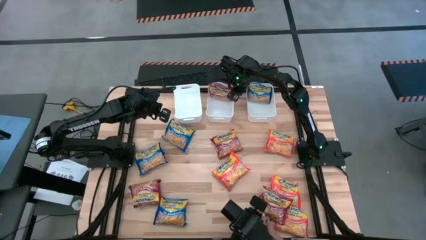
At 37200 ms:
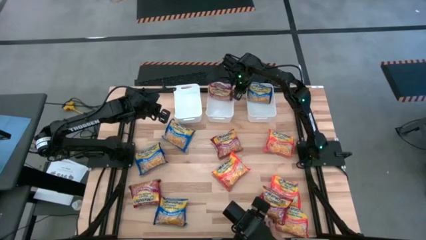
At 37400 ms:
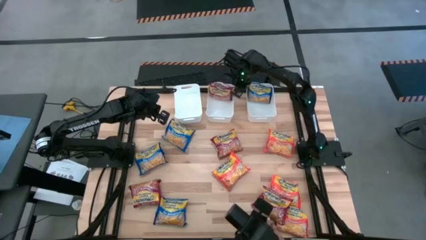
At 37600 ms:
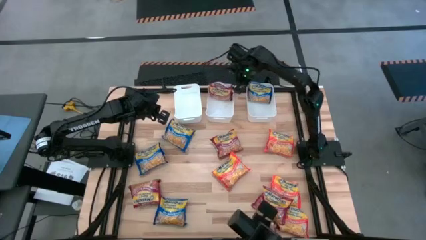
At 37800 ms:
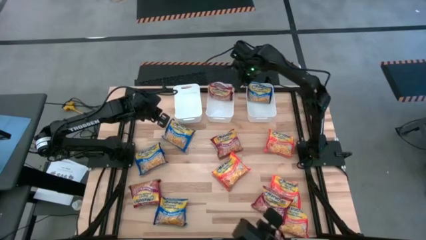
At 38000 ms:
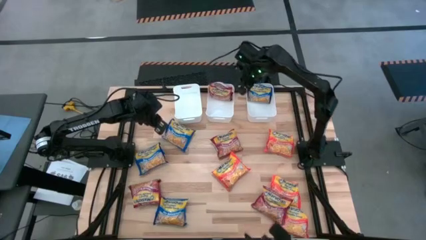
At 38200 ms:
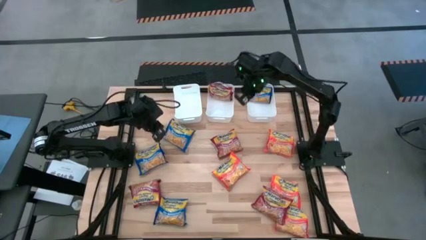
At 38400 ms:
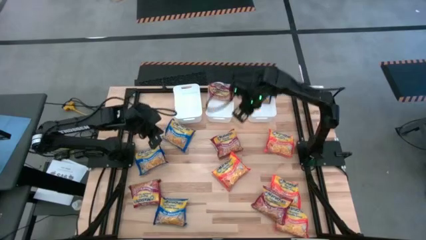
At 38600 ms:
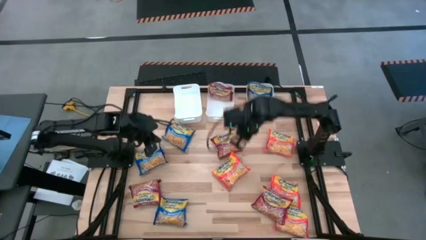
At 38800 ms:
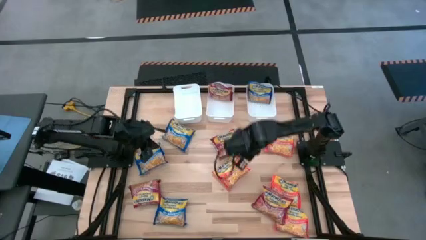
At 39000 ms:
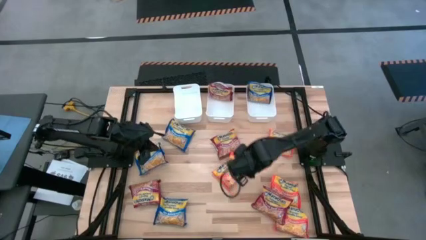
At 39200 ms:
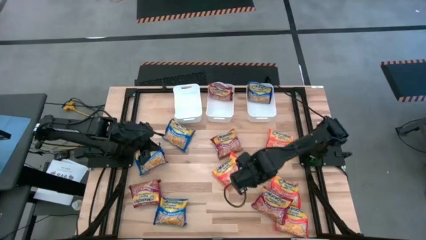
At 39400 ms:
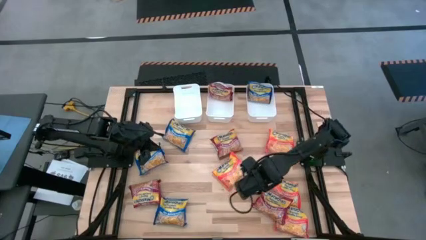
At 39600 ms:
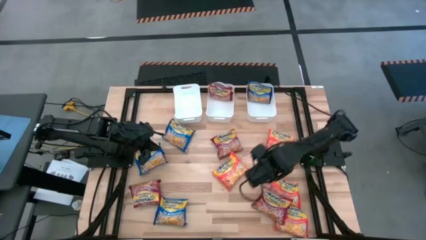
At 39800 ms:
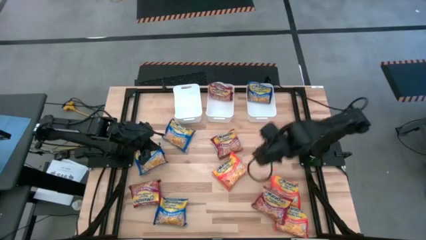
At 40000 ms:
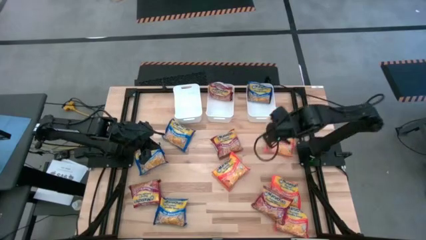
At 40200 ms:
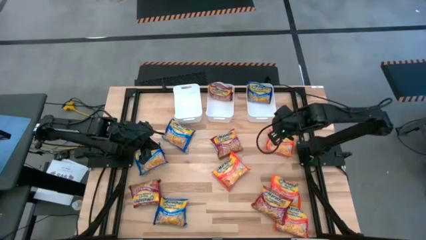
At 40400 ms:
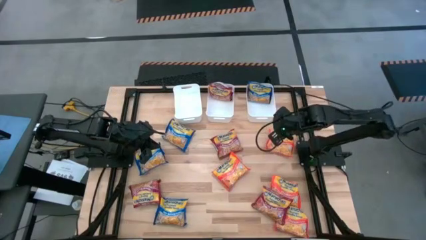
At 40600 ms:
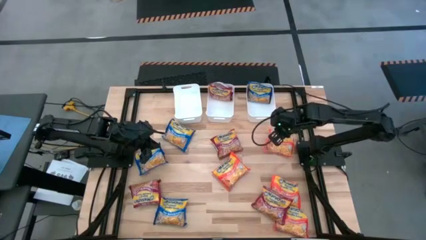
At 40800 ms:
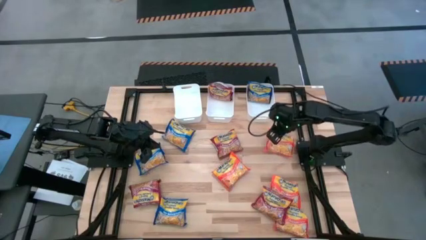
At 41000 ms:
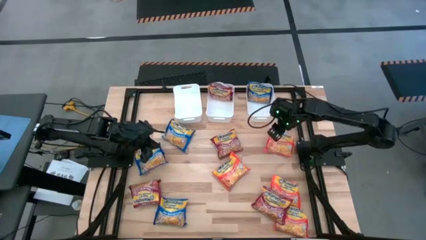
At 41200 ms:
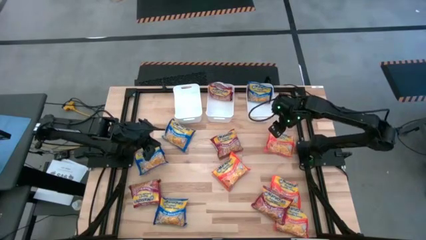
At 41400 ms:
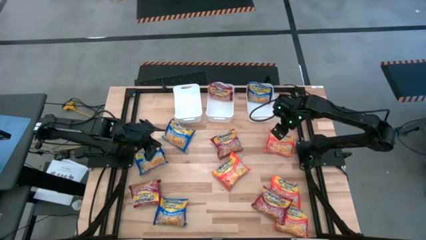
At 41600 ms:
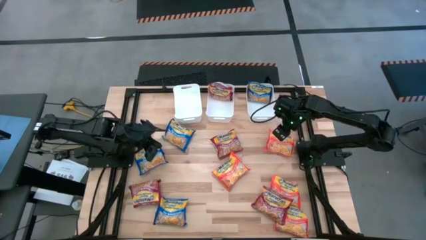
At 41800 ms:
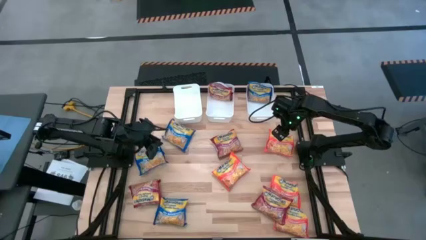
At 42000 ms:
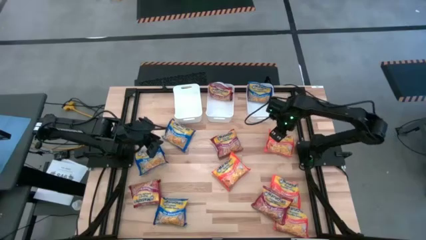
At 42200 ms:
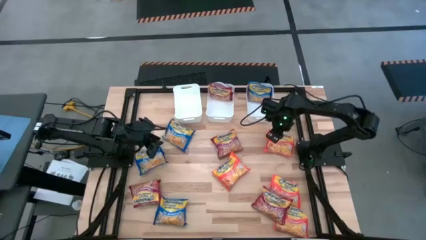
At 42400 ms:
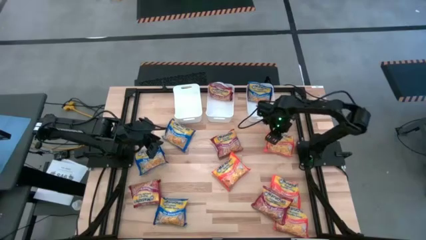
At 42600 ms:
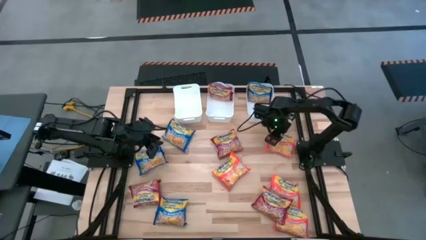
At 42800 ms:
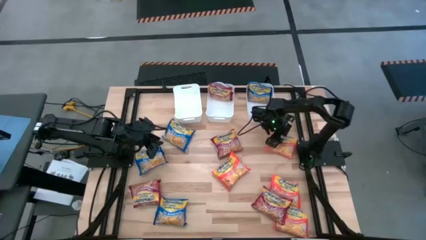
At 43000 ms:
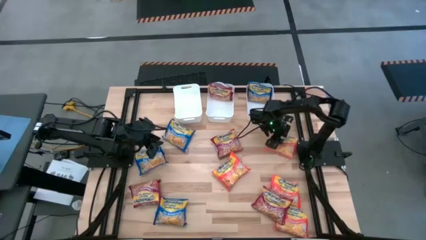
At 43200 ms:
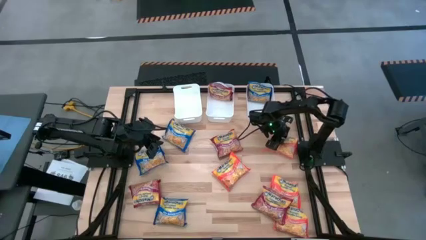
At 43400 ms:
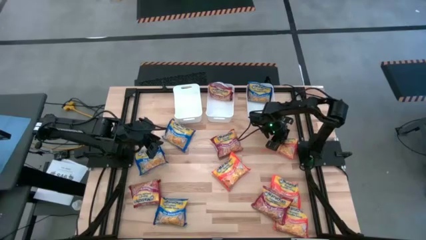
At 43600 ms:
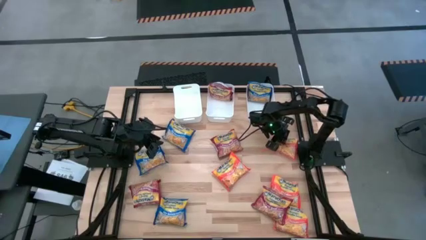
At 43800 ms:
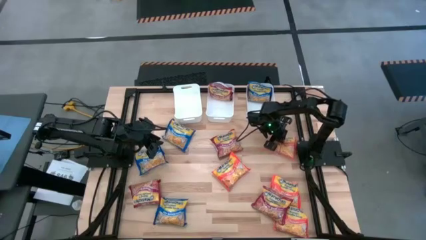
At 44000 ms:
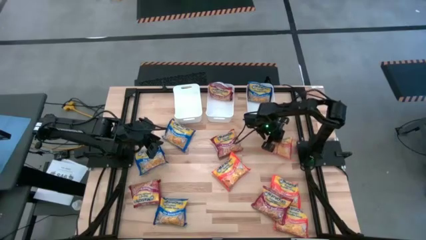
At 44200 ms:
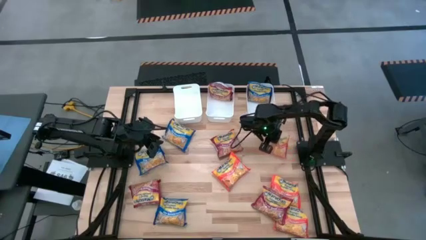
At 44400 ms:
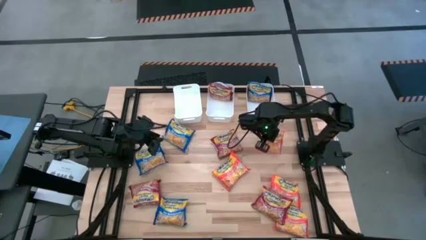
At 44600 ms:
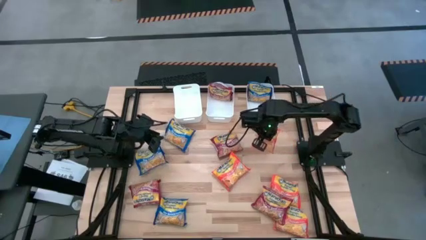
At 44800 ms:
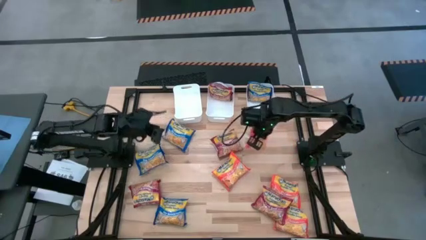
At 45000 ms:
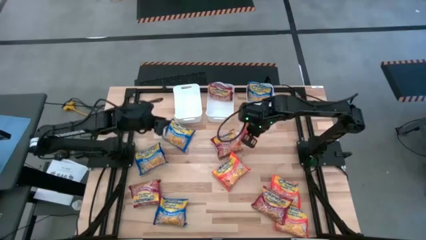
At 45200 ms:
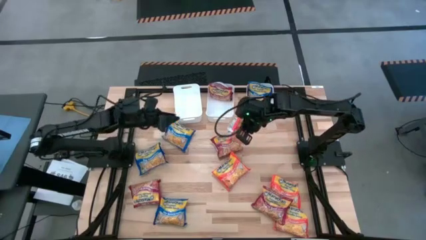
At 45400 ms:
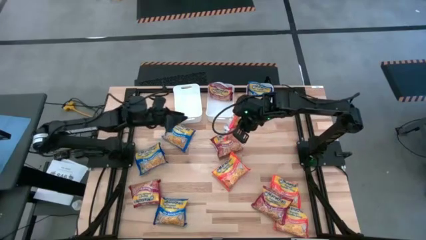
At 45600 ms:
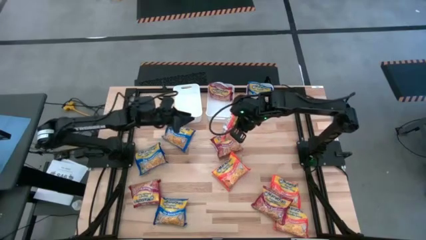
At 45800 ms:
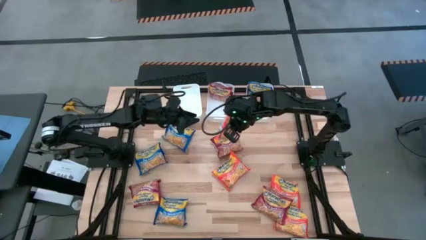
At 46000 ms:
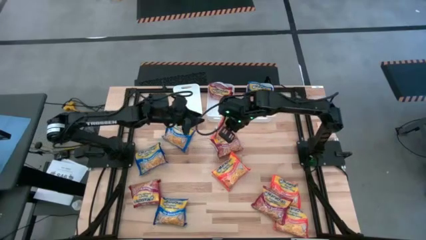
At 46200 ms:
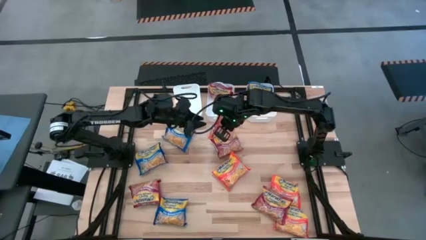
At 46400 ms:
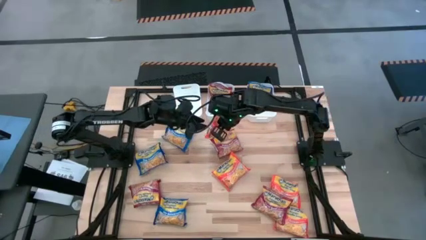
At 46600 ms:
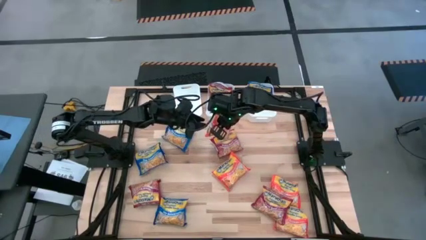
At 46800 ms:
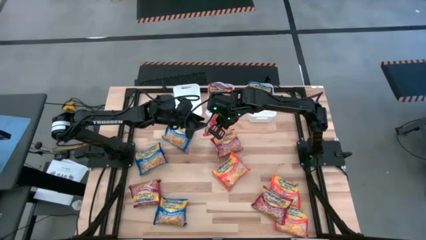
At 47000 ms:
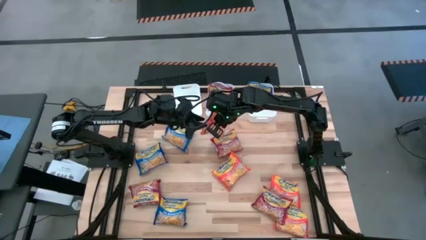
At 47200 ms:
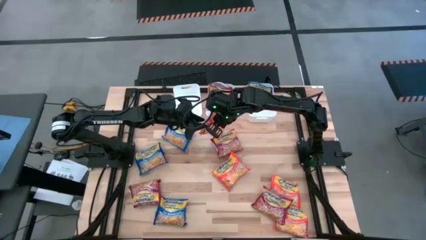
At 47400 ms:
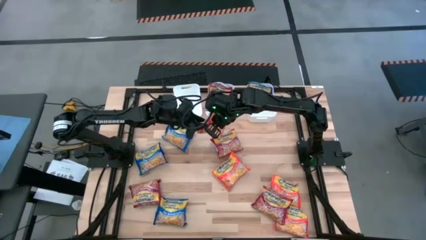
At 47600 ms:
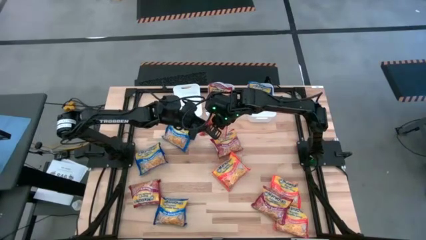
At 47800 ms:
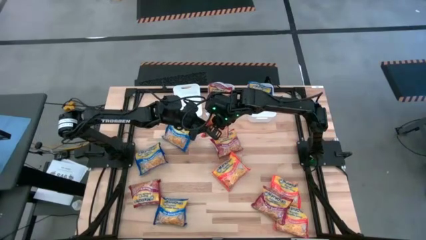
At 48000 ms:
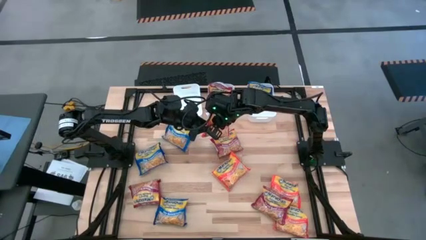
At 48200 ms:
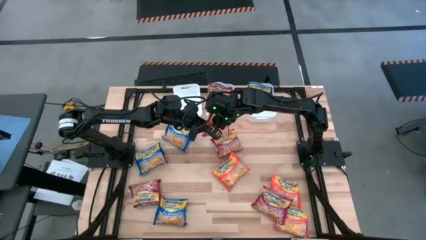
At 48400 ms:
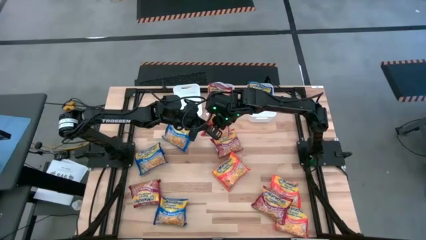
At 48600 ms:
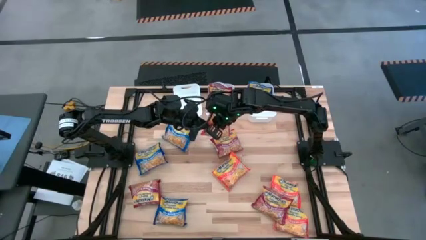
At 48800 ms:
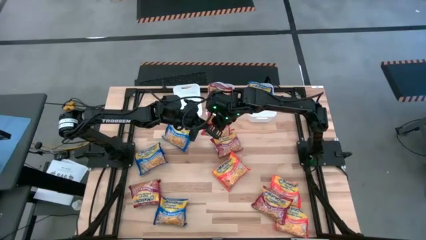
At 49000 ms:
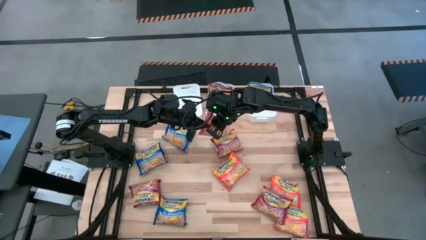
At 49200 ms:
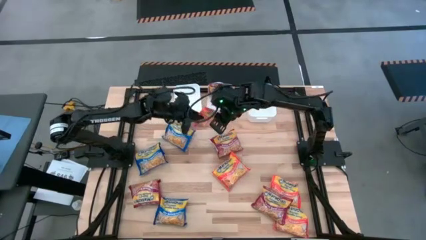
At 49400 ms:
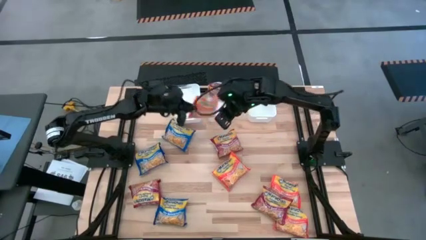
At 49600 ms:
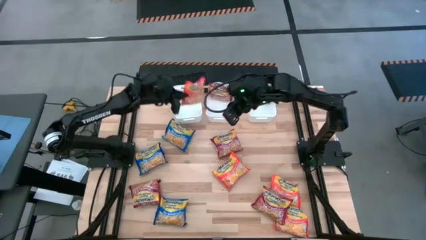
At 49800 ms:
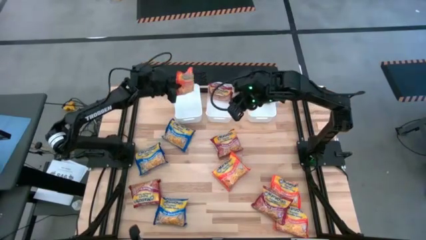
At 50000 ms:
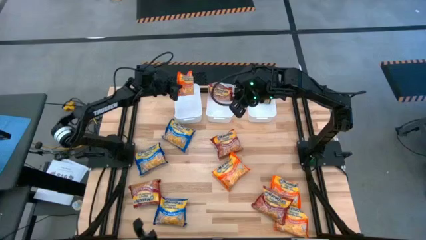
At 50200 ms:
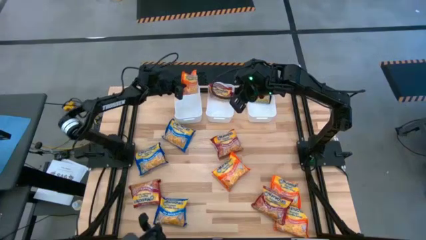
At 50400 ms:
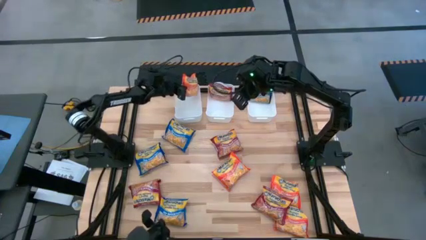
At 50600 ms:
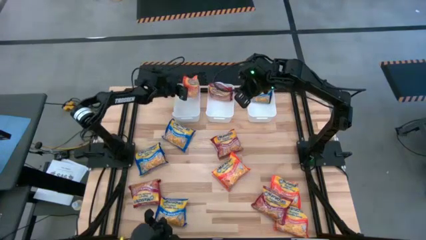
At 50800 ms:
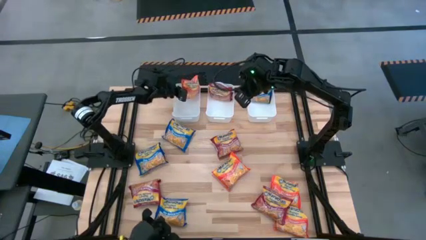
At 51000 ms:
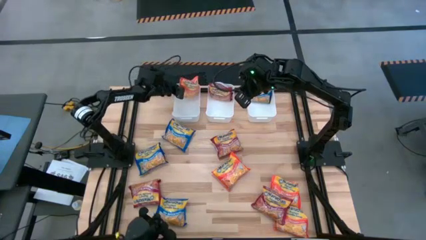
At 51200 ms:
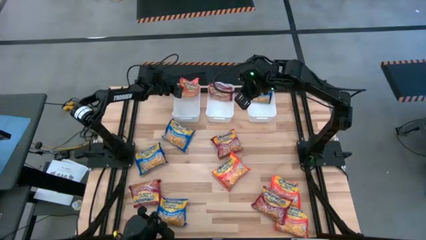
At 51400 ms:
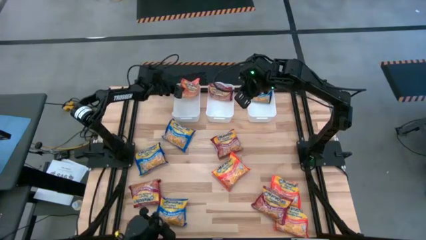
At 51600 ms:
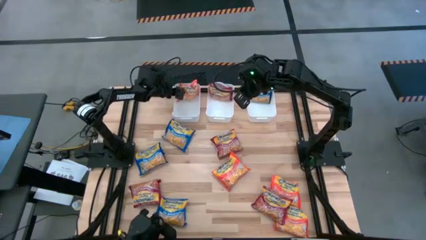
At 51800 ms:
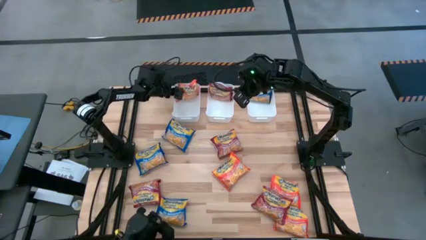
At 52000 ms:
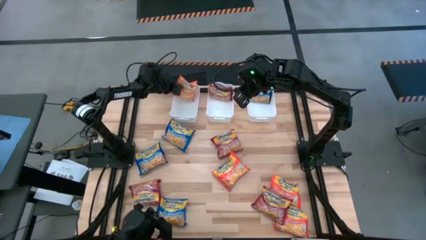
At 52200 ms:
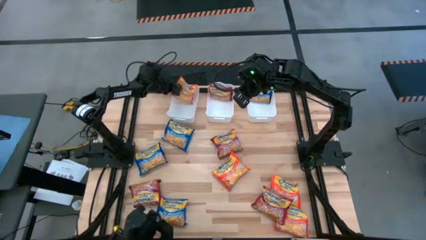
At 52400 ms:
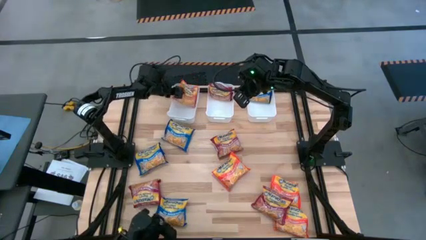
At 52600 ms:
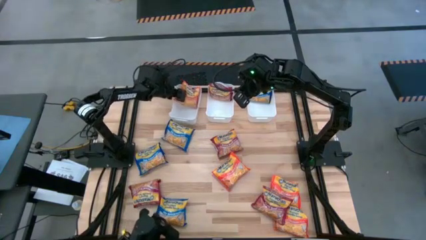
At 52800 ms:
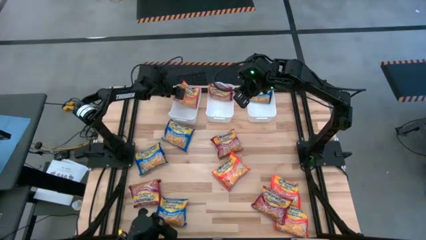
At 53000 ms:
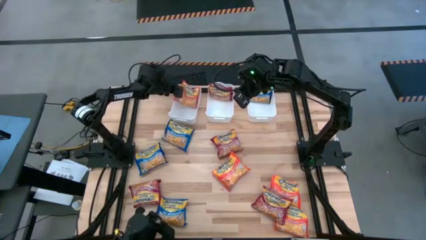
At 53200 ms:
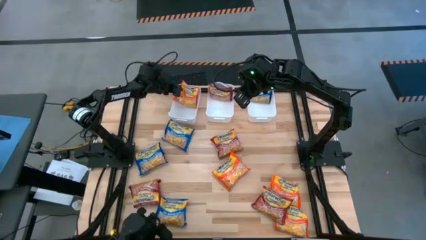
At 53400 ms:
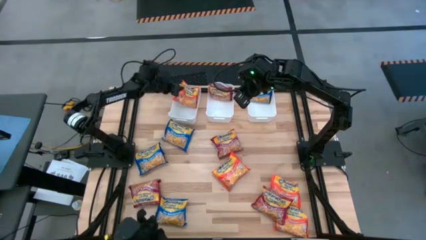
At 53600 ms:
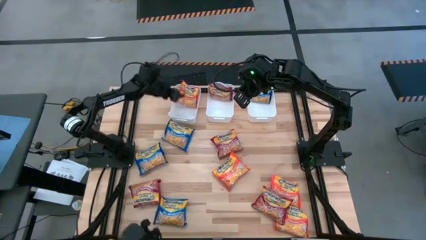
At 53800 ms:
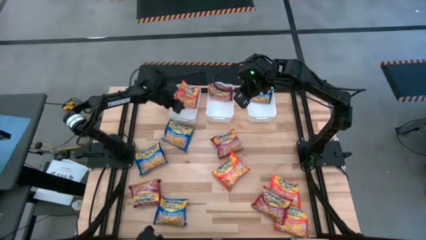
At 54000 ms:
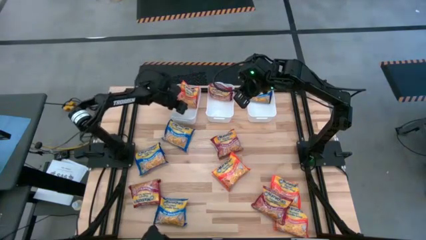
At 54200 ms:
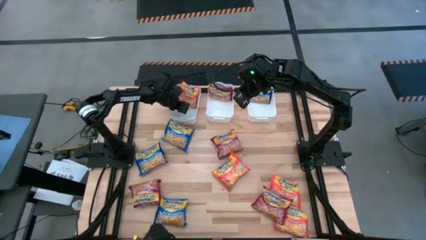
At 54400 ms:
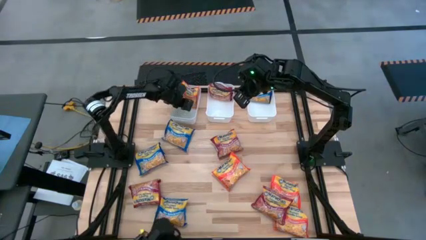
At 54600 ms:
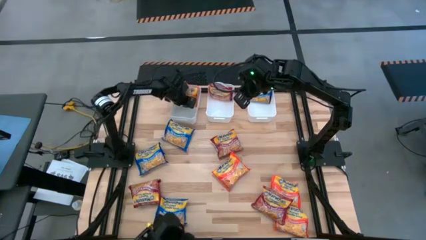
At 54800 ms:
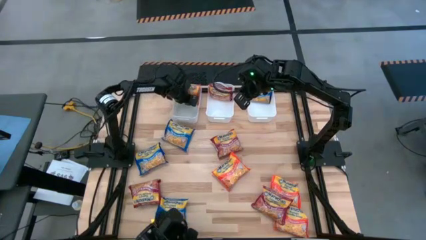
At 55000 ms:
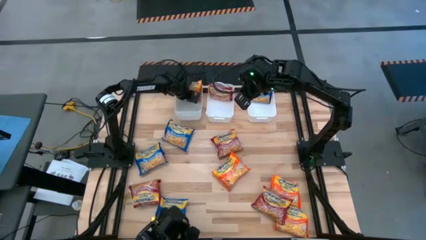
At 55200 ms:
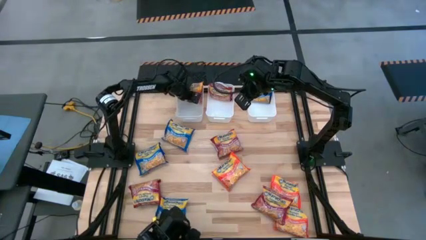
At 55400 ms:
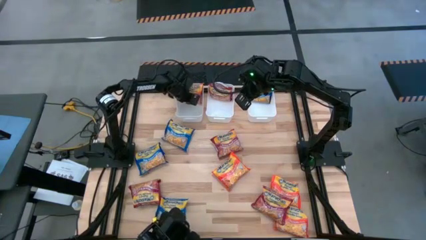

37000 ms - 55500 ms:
Task: Sort Maruchan noodles
Put the orange noodle pack into the left white bin
